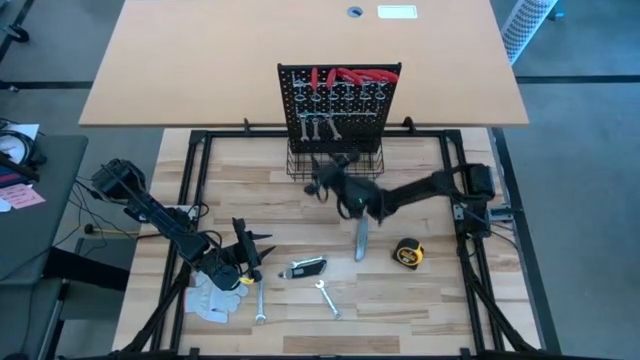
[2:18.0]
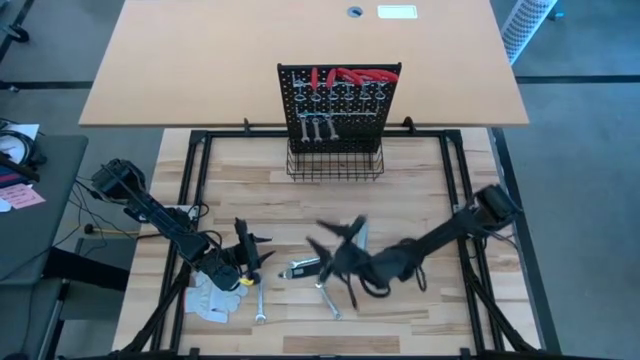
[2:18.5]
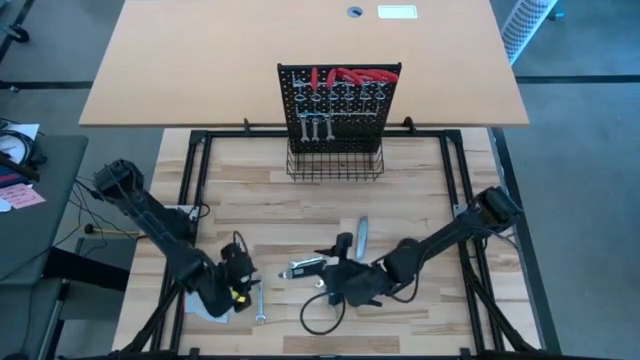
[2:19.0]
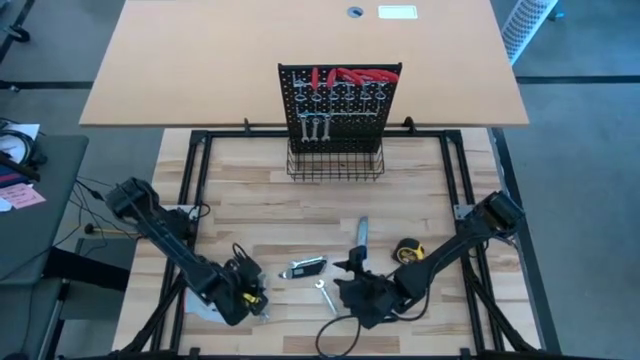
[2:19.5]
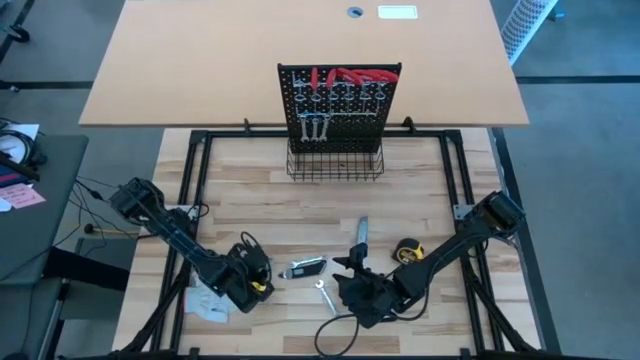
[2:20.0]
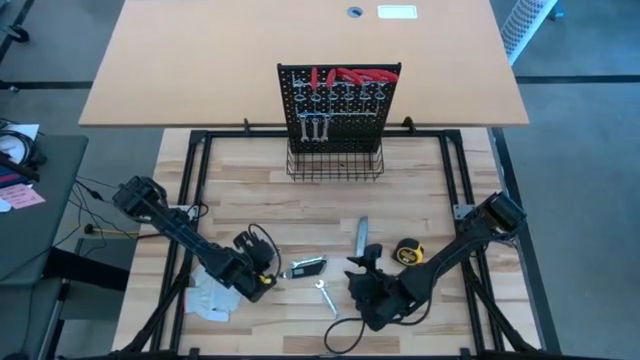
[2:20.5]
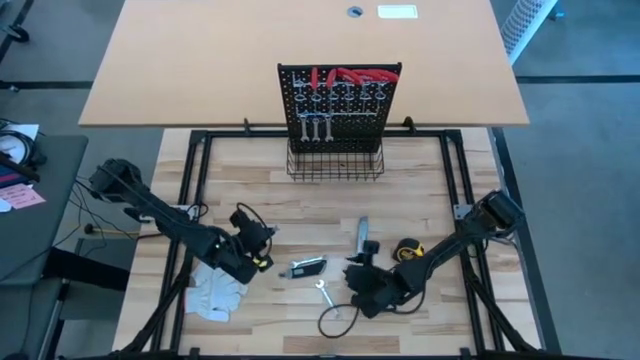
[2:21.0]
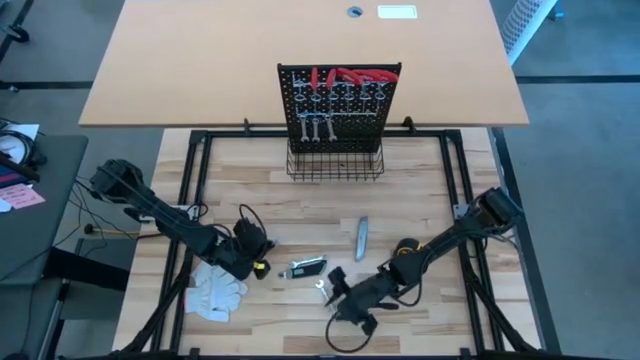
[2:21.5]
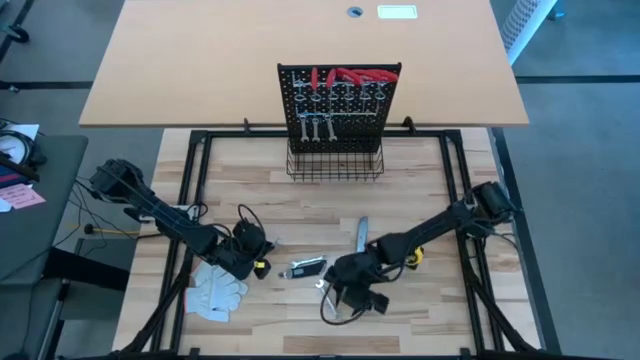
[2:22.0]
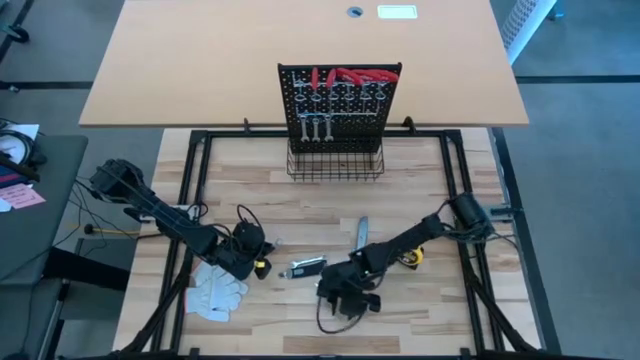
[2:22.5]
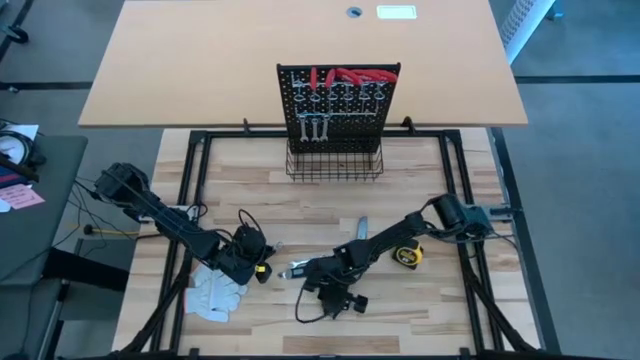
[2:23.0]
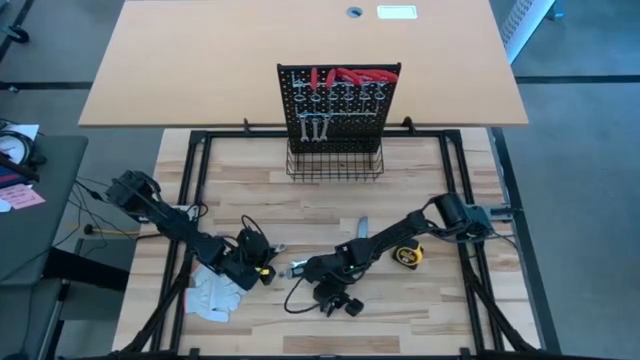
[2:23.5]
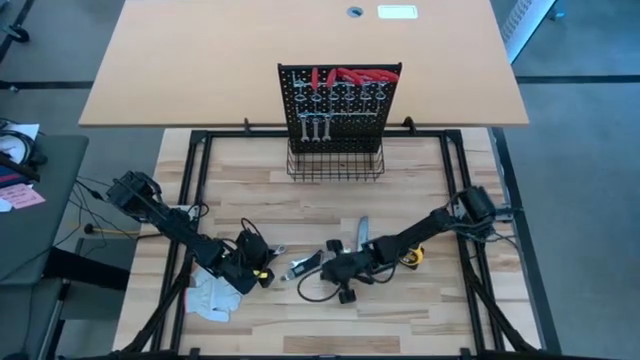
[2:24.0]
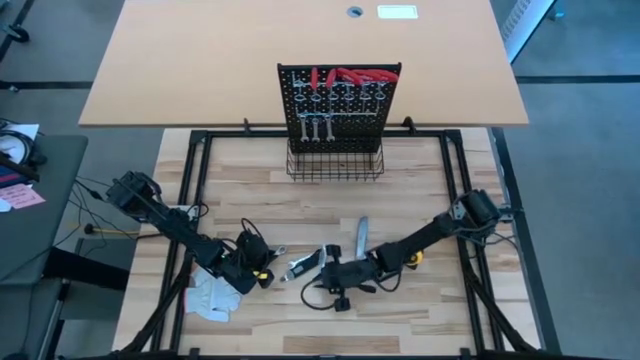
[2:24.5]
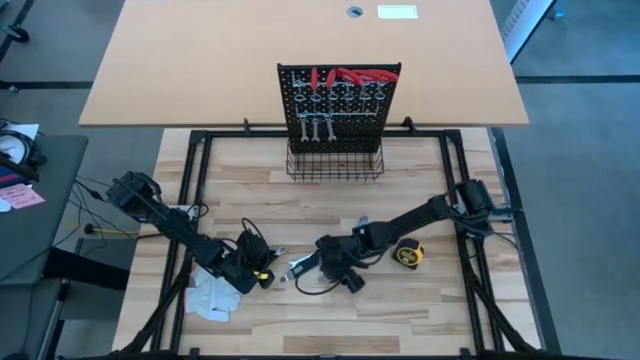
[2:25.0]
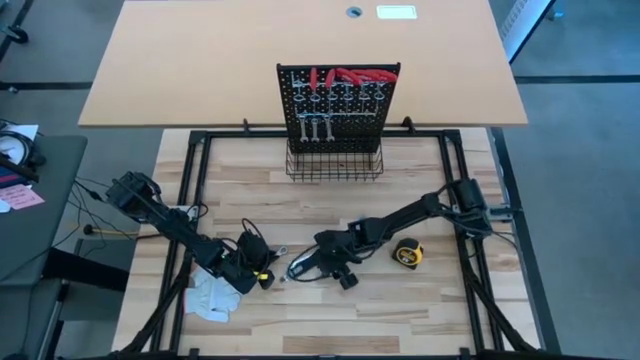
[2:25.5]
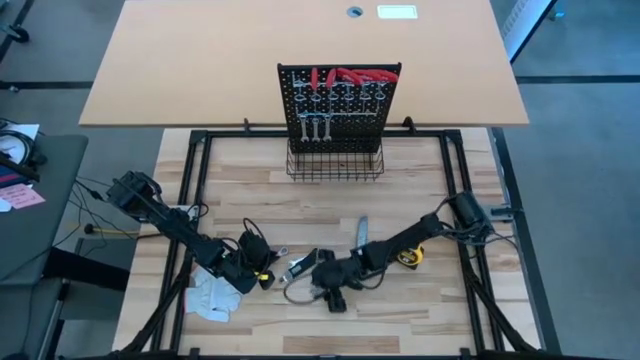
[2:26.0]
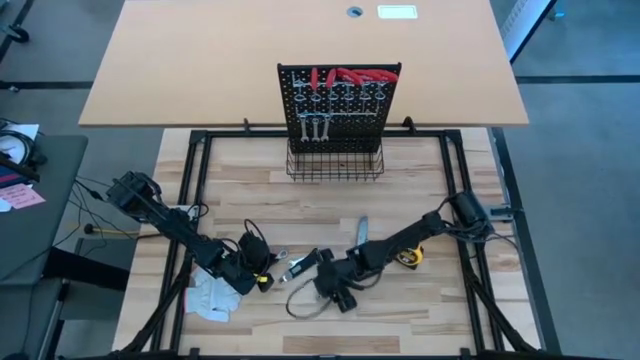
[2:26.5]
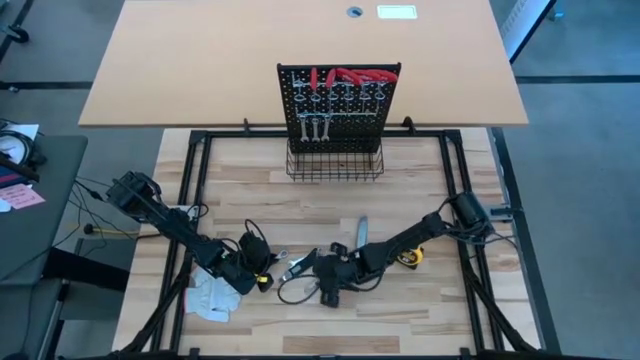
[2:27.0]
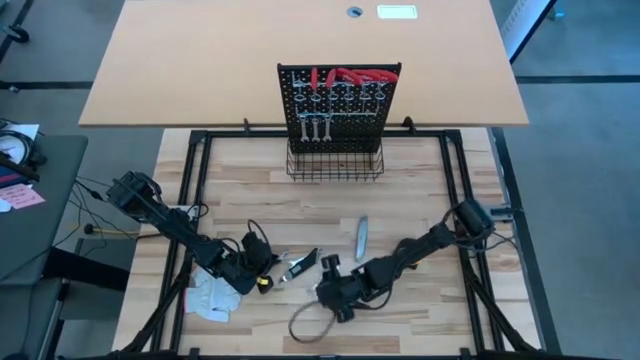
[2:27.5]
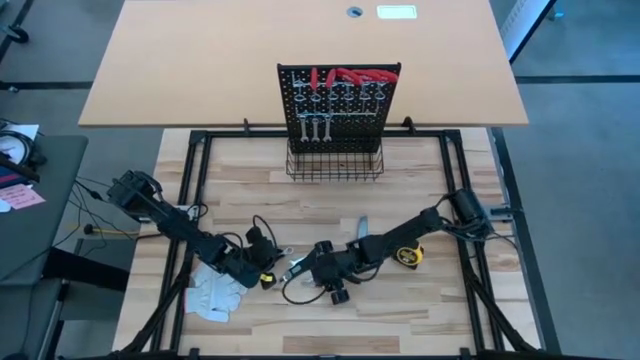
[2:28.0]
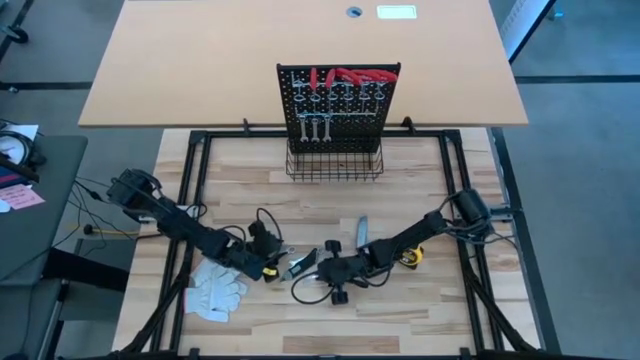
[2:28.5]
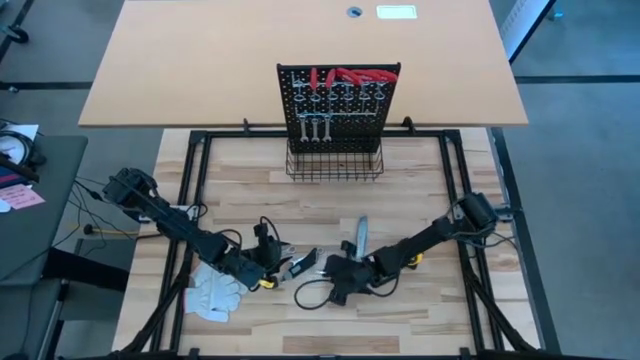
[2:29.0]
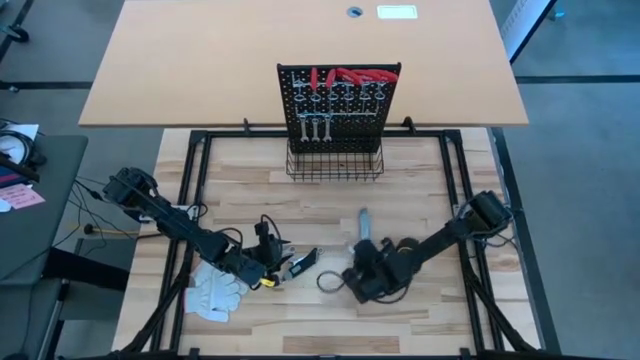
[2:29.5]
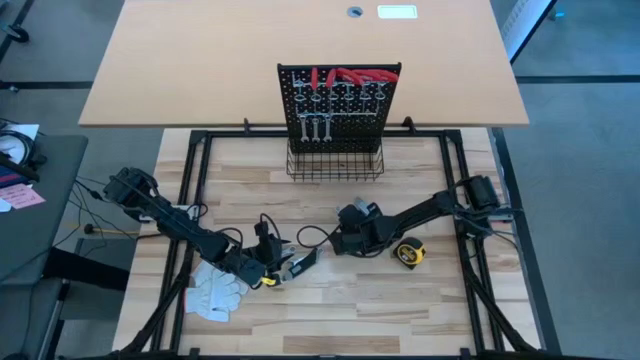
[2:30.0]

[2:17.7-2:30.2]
Task: Hang tools onto peg board
Hang the silver wrench on the pegboard

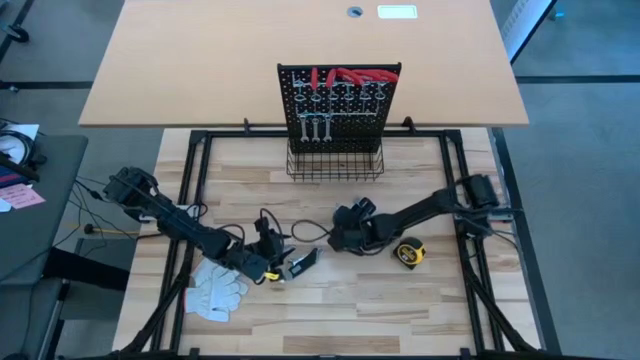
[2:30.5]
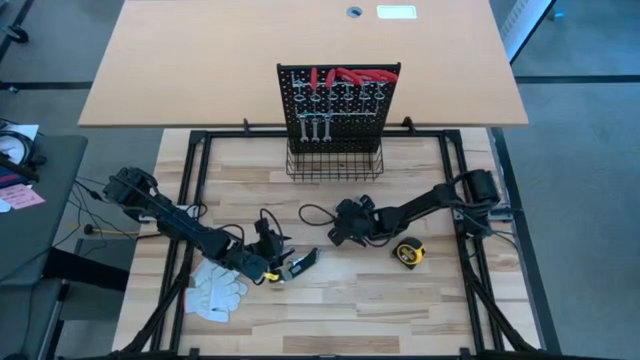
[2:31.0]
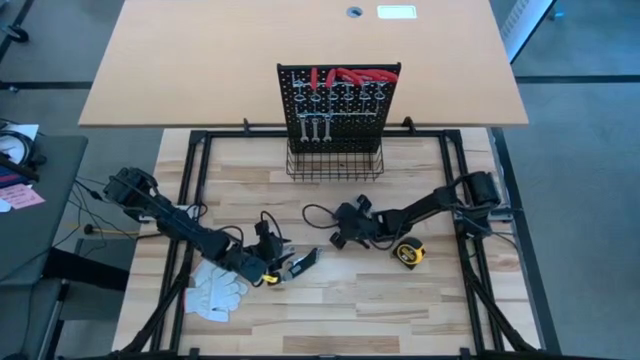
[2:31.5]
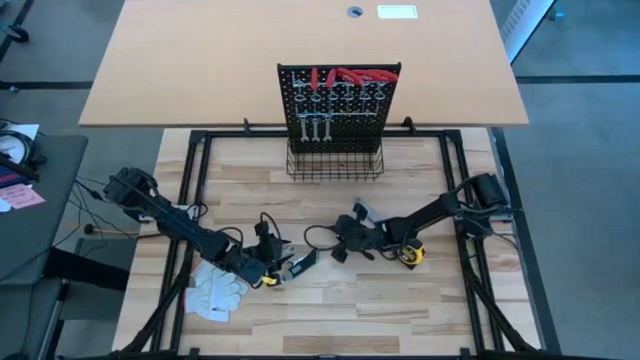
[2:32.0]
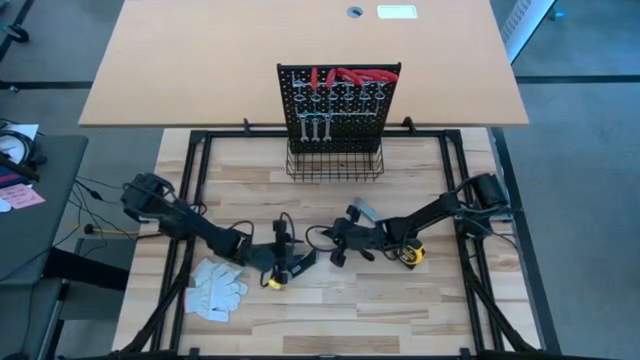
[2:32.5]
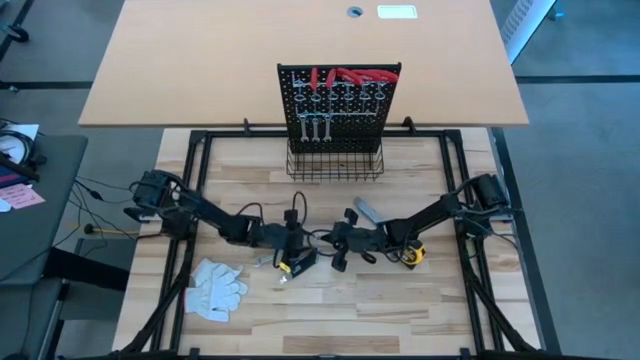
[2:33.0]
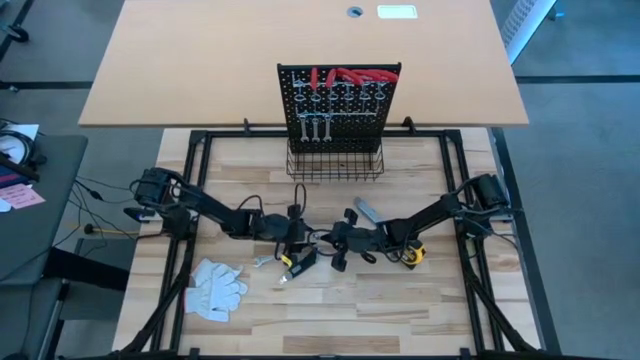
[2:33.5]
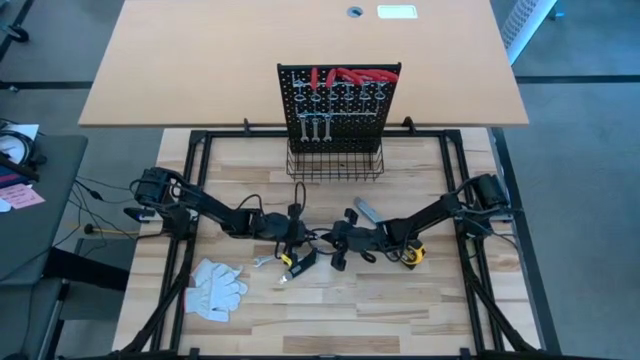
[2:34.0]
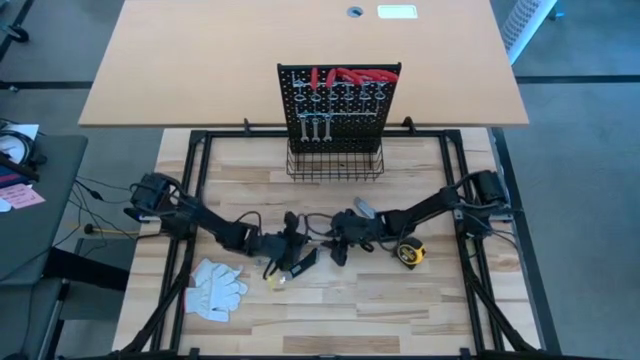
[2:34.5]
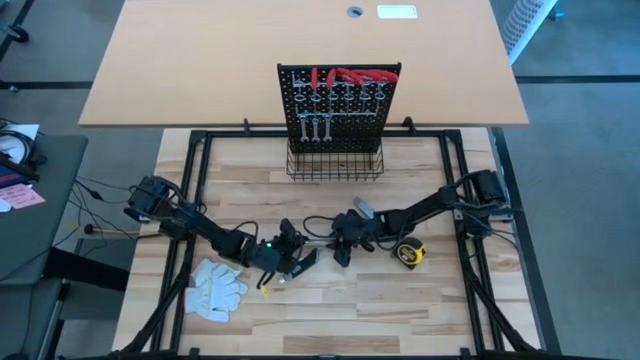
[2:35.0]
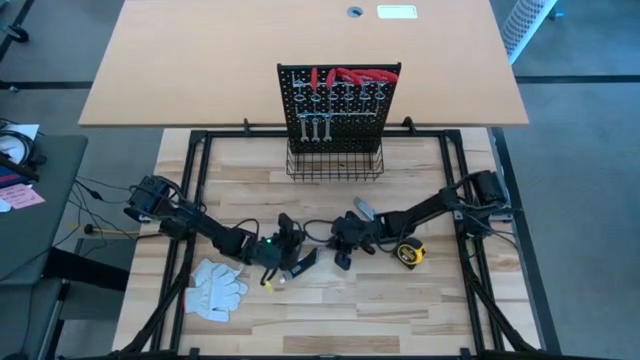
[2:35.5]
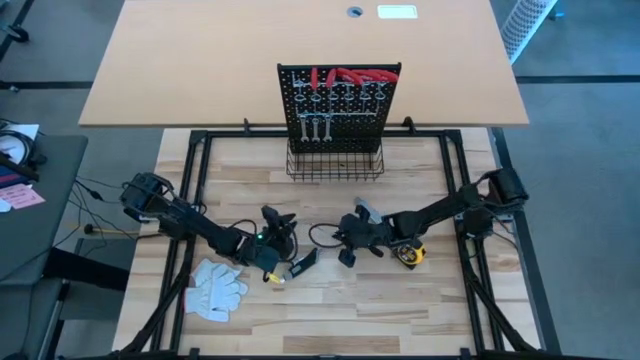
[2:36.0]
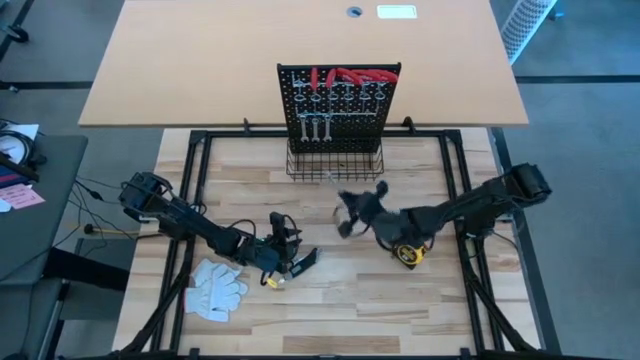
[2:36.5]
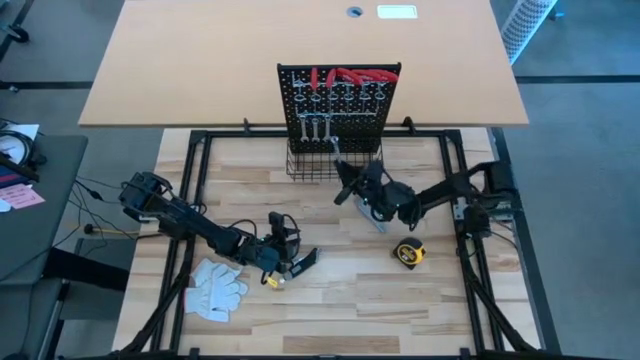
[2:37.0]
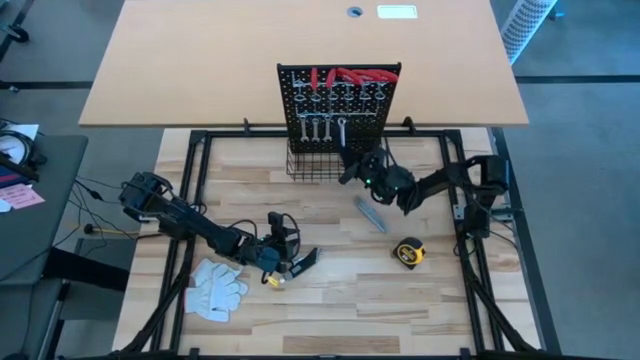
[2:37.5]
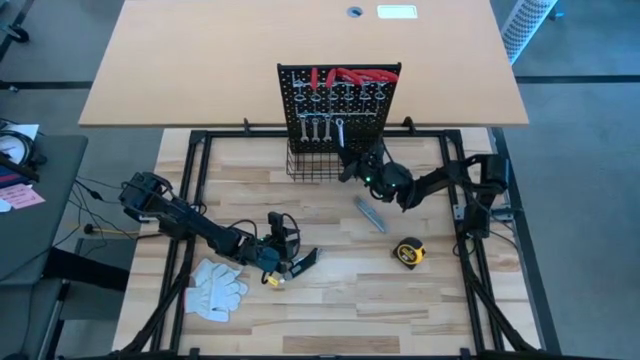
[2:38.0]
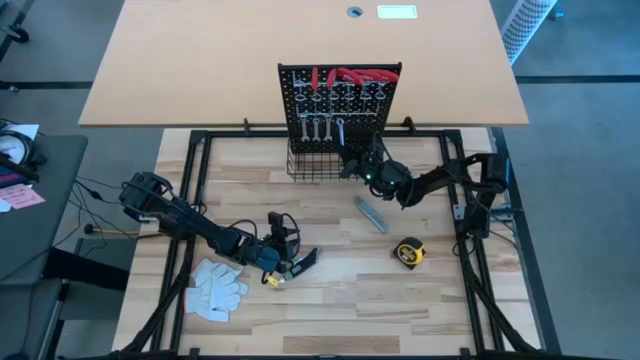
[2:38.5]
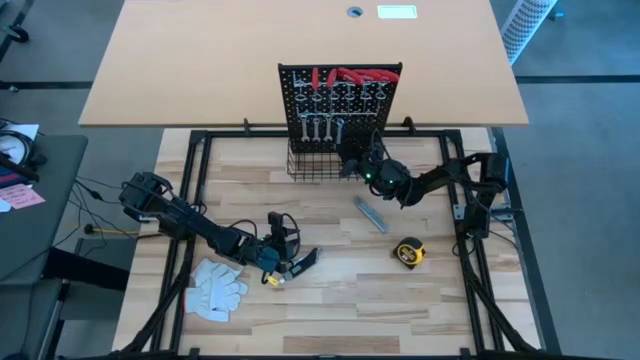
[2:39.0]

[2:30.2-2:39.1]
Hang the silver wrench on the pegboard
